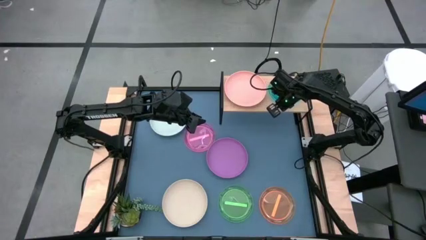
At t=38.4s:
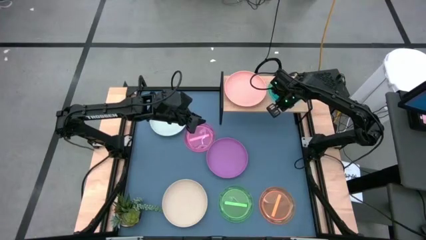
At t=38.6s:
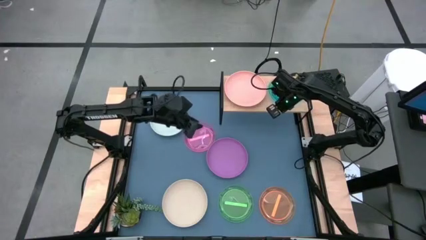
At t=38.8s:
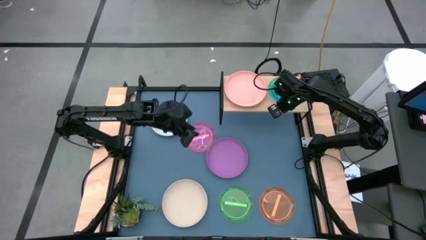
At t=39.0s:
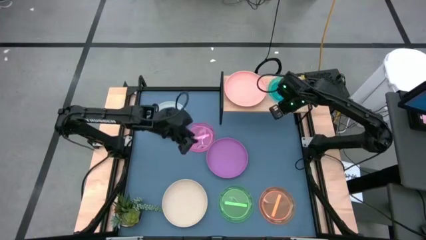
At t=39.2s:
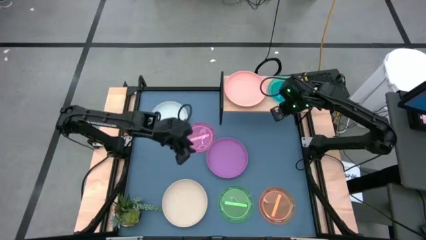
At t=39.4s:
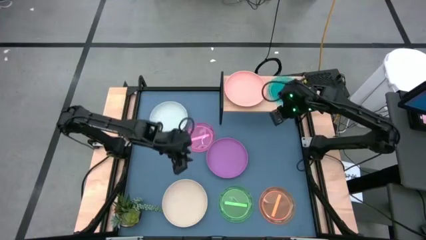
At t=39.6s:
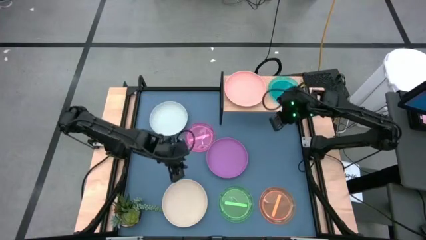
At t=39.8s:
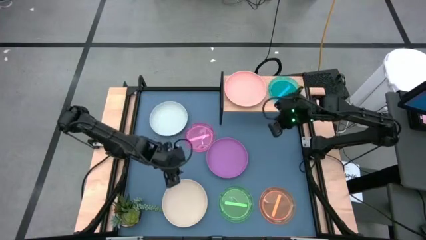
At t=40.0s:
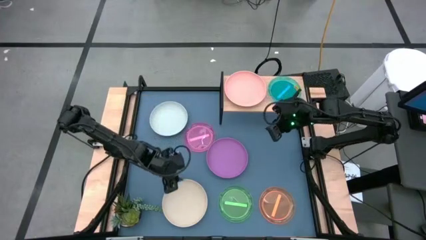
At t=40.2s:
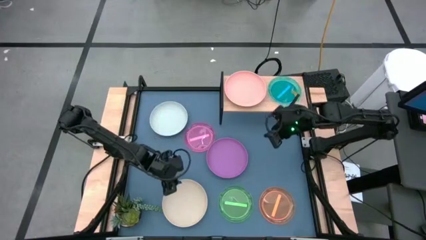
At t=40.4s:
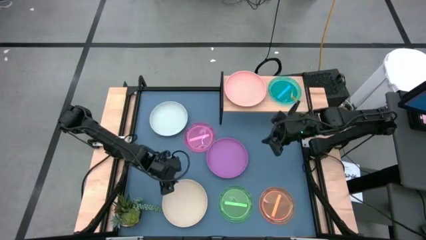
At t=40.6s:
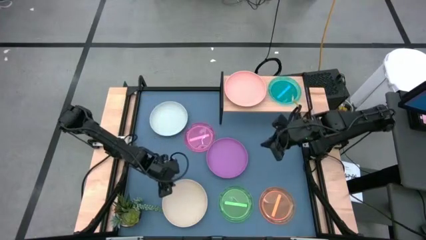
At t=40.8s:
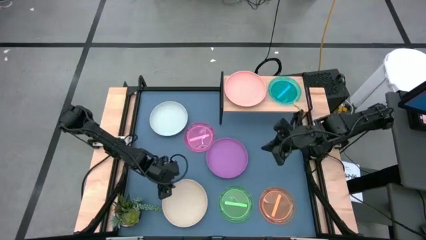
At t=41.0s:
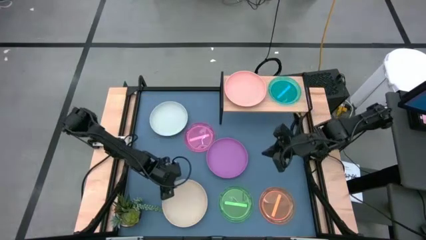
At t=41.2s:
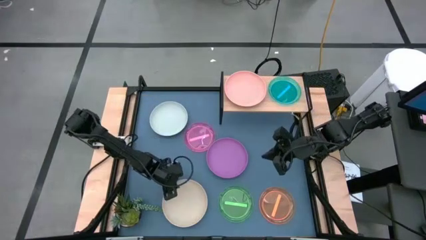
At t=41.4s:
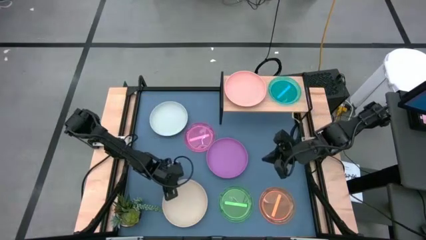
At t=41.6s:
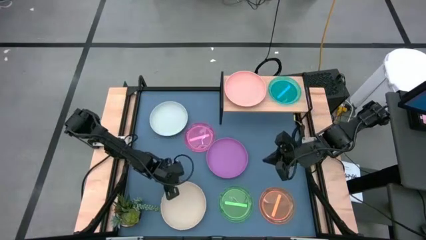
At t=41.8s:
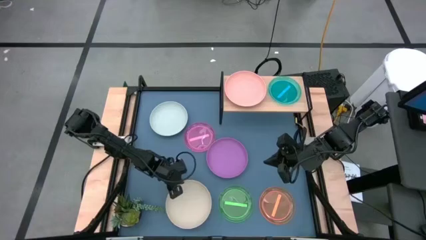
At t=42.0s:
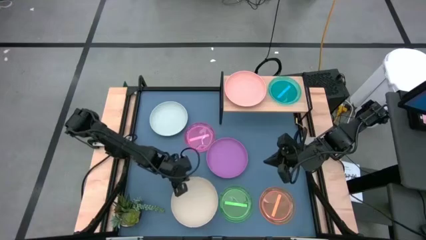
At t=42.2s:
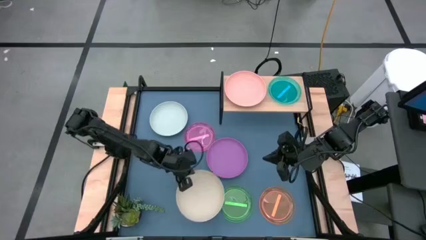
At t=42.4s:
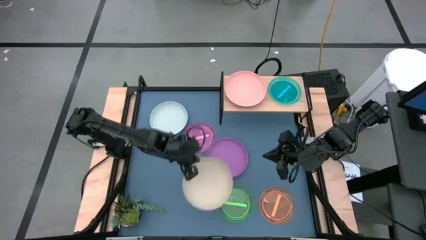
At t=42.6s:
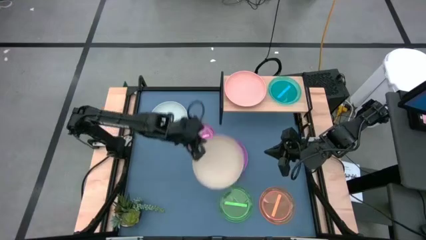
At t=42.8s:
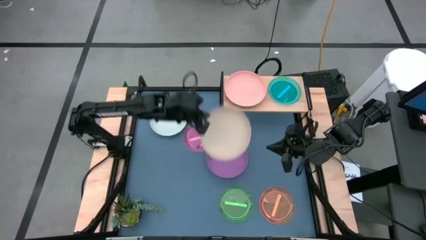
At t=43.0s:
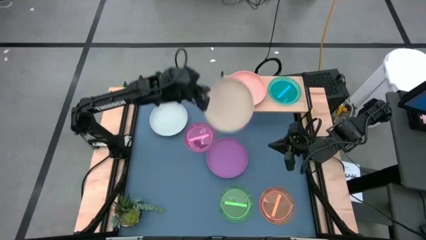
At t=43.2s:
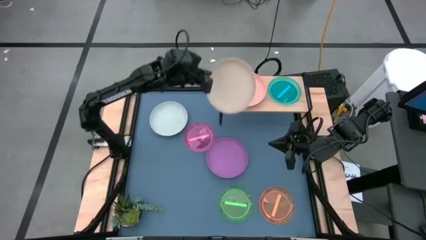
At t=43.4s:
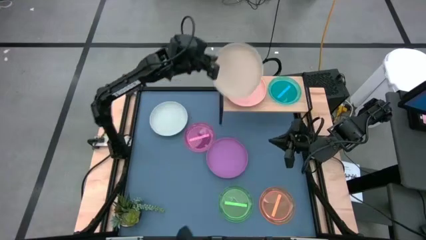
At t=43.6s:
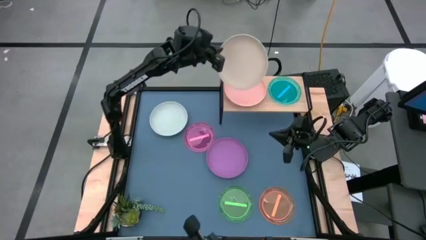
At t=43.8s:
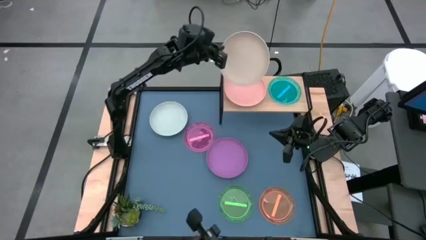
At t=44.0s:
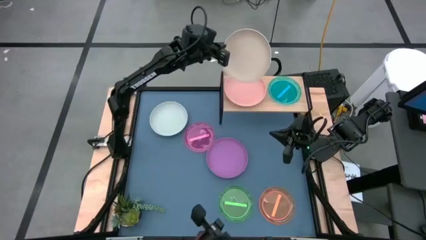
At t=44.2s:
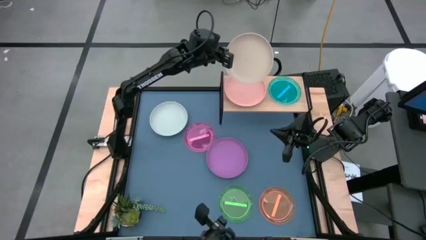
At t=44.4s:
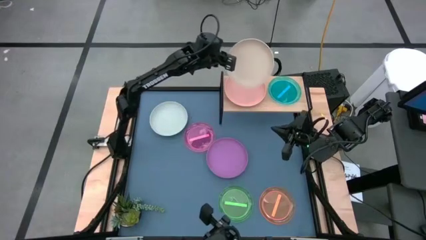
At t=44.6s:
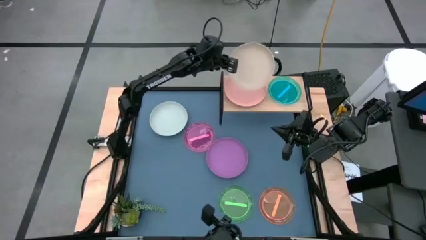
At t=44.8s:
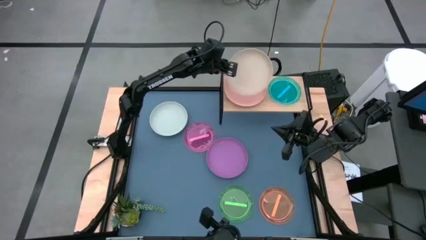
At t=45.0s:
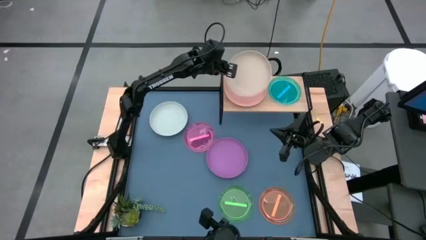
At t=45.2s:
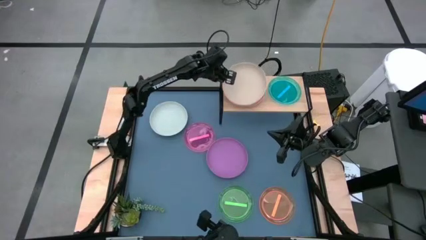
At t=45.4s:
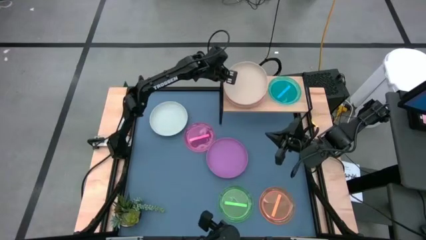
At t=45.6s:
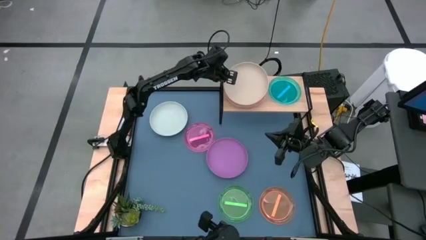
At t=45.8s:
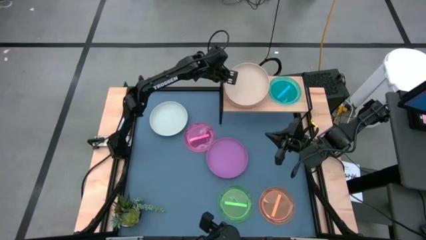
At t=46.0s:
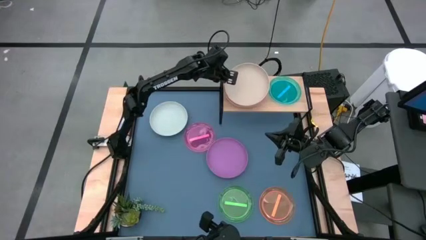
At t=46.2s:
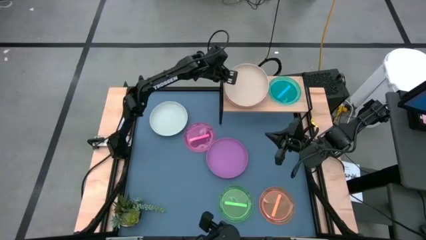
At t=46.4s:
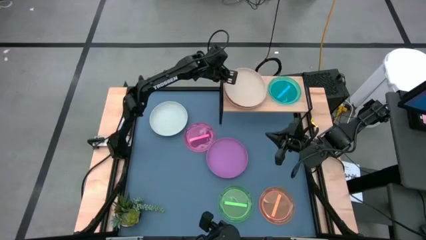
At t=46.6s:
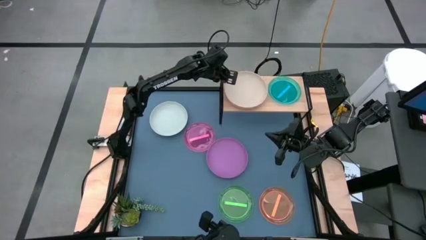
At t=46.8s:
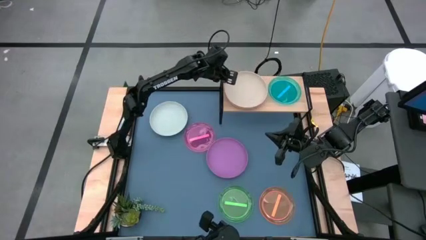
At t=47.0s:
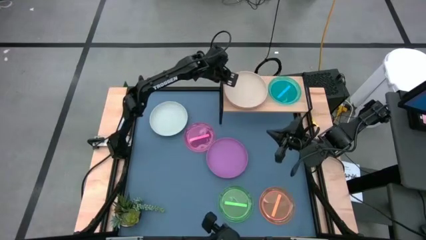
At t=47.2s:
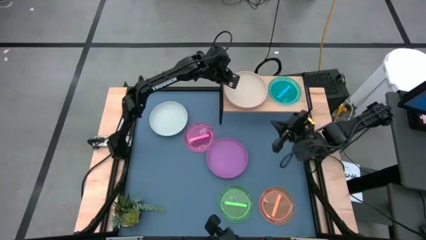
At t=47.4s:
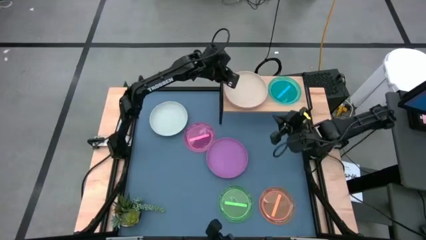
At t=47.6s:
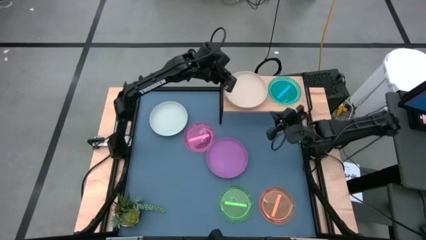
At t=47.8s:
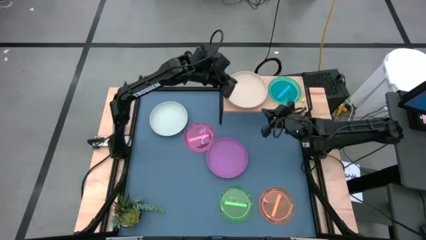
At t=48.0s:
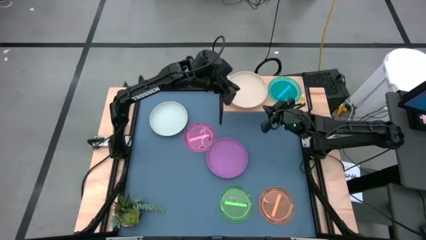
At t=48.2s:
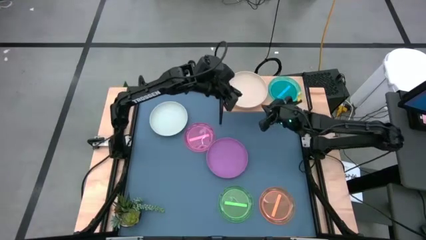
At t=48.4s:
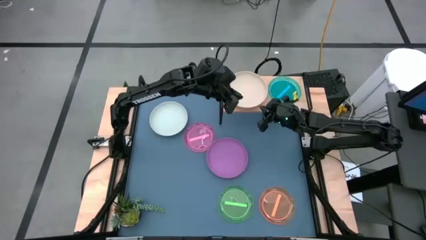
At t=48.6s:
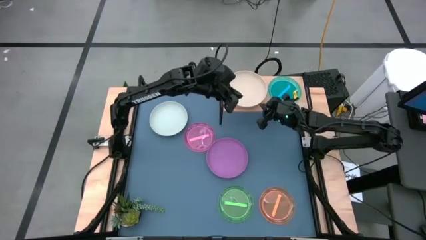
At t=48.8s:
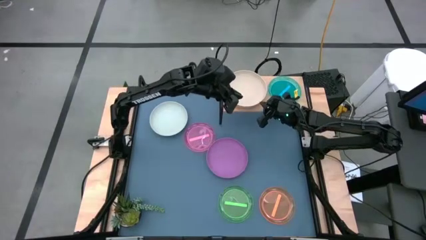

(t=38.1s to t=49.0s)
Task: Place and stack plates onto a shelf
Stack the large light brown plate on top of the large light orange plate on the shelf
